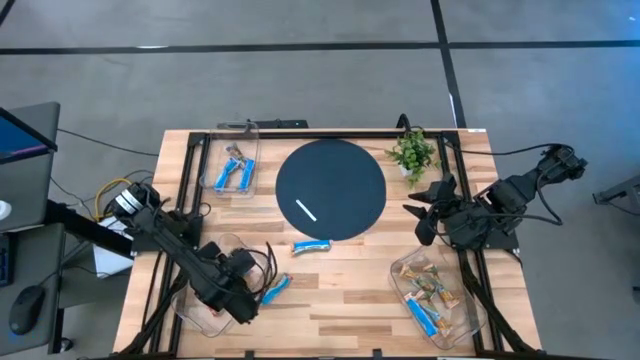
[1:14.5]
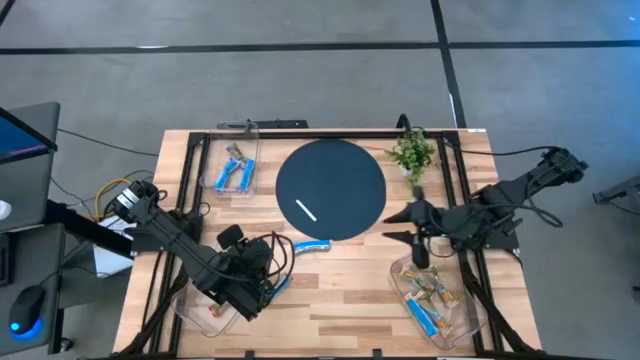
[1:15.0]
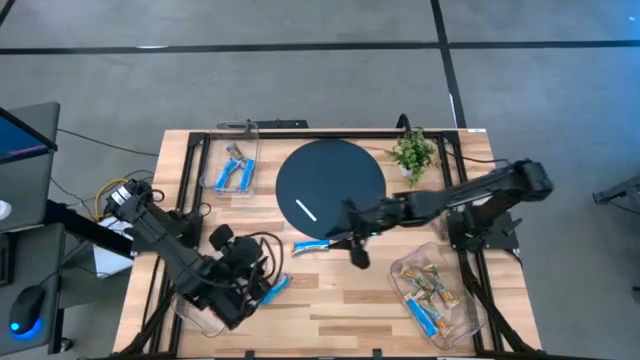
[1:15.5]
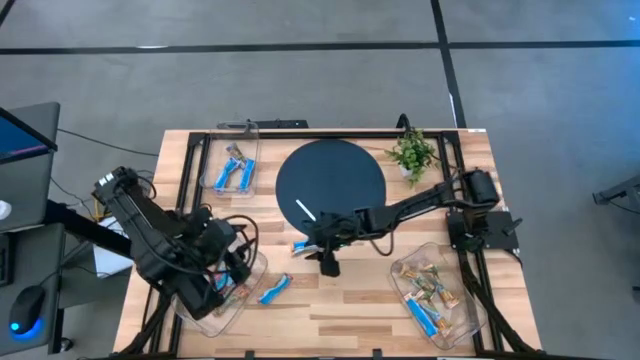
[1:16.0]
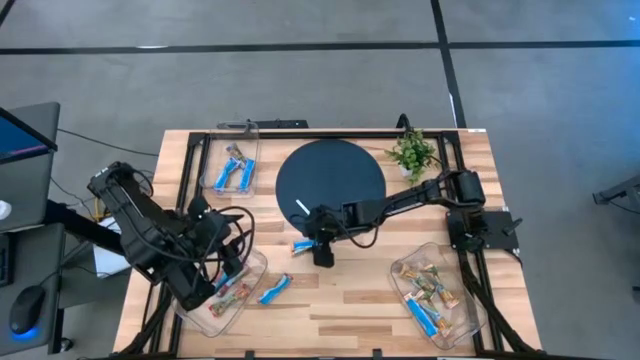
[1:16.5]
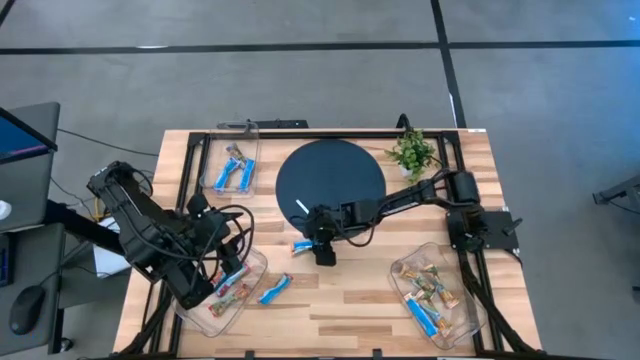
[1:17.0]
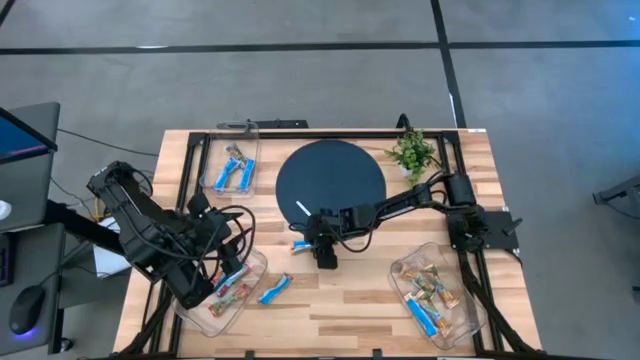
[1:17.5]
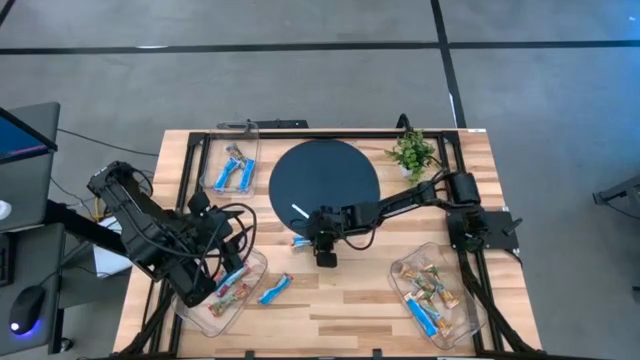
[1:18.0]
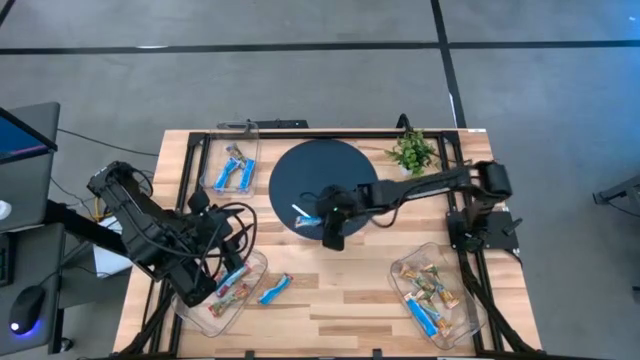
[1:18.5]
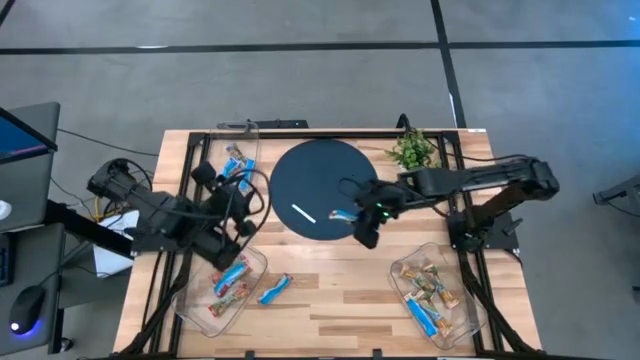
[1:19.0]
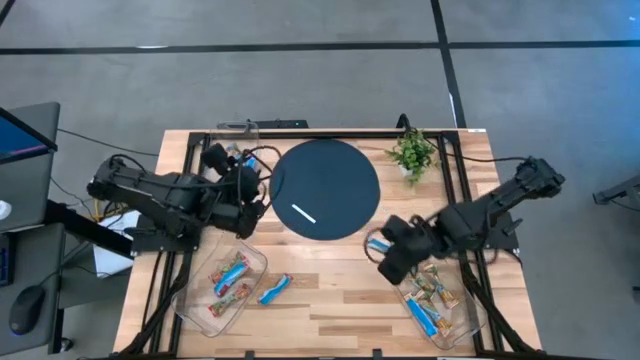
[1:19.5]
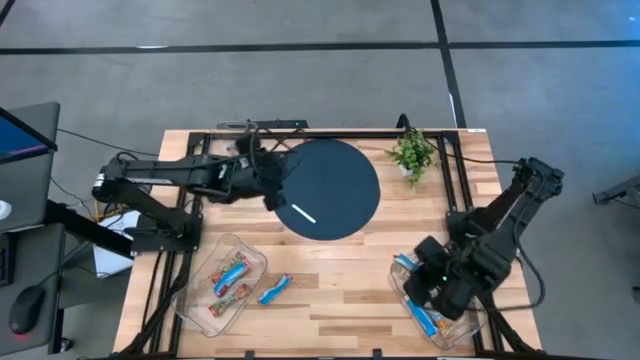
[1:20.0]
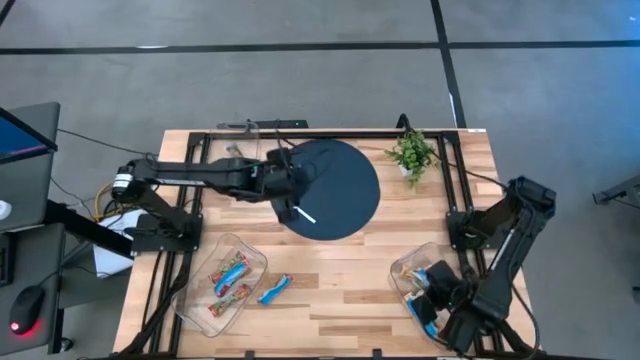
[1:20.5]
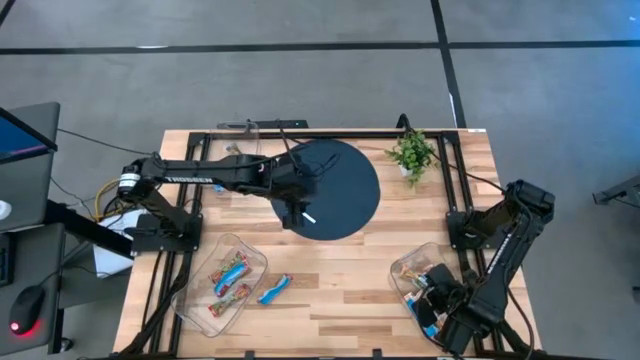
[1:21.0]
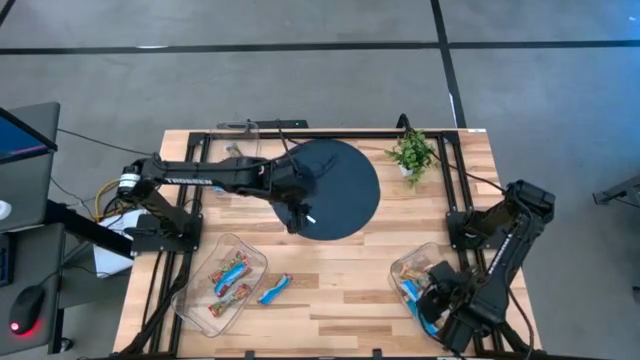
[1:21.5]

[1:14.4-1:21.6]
Task: Pick and place Granola Bars by type
Put the yellow granola bar into the bottom right transparent bin

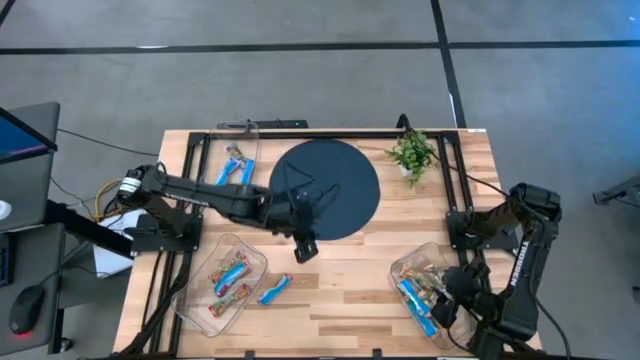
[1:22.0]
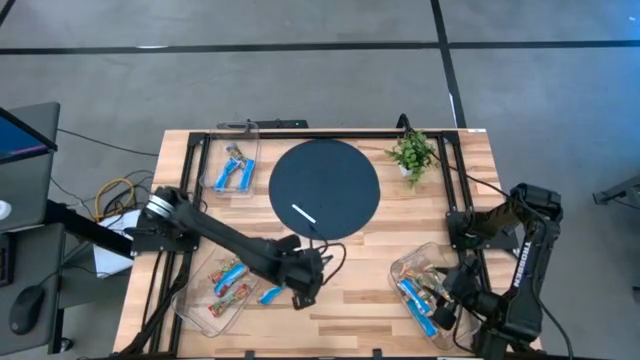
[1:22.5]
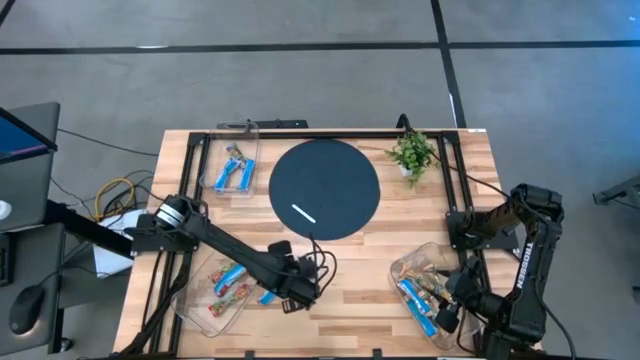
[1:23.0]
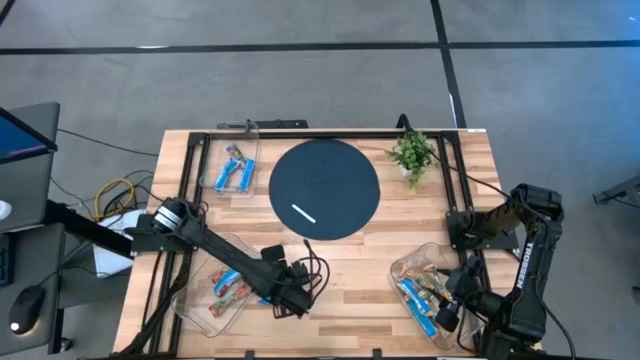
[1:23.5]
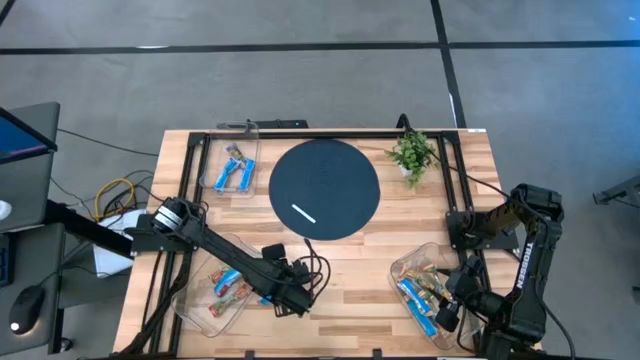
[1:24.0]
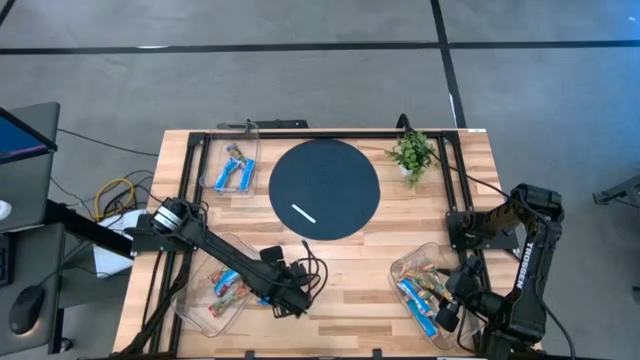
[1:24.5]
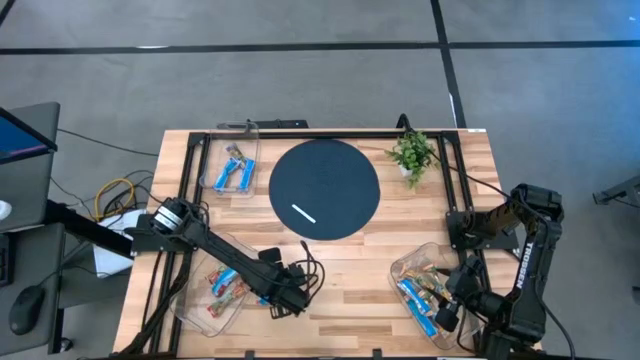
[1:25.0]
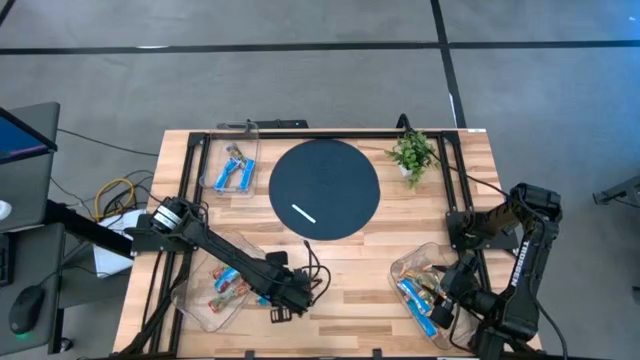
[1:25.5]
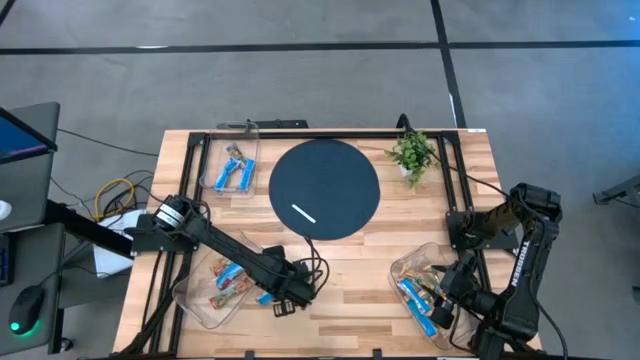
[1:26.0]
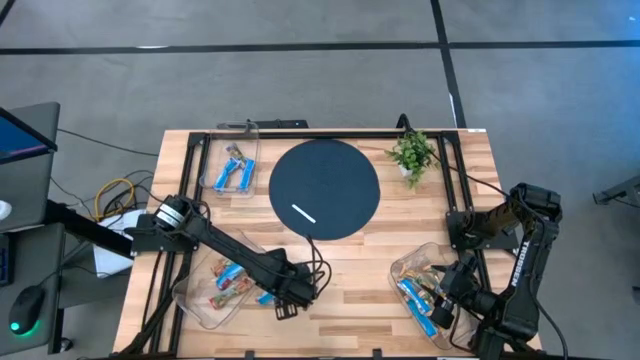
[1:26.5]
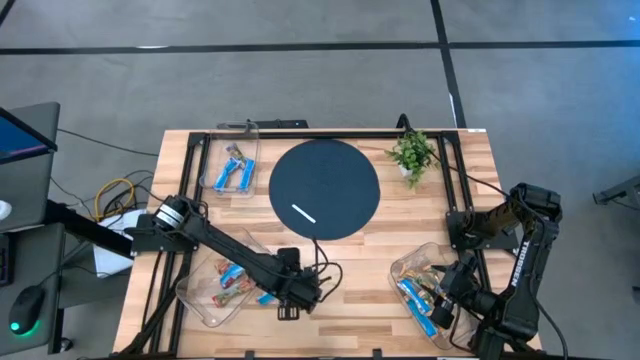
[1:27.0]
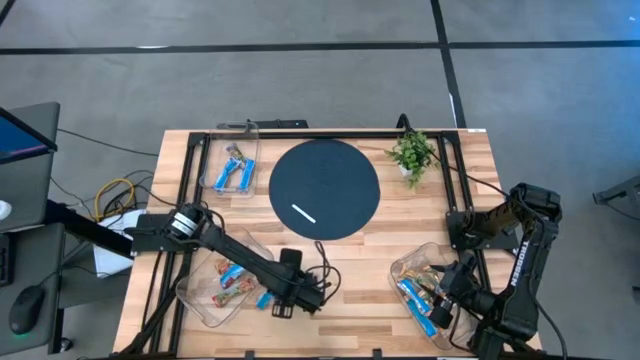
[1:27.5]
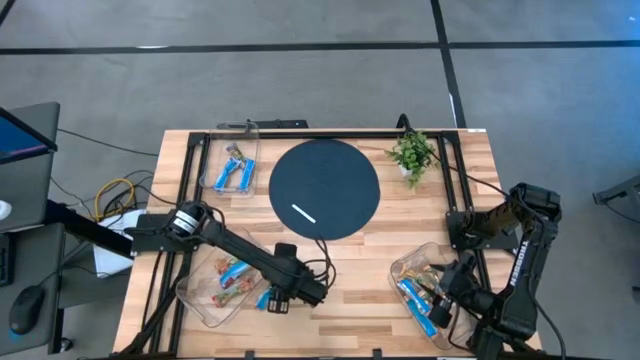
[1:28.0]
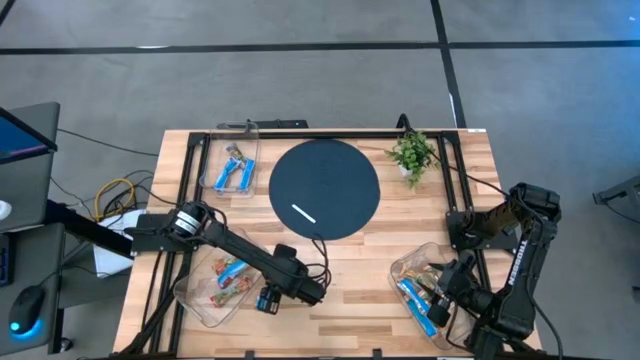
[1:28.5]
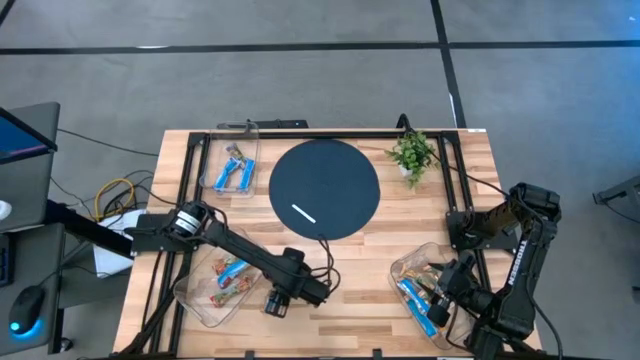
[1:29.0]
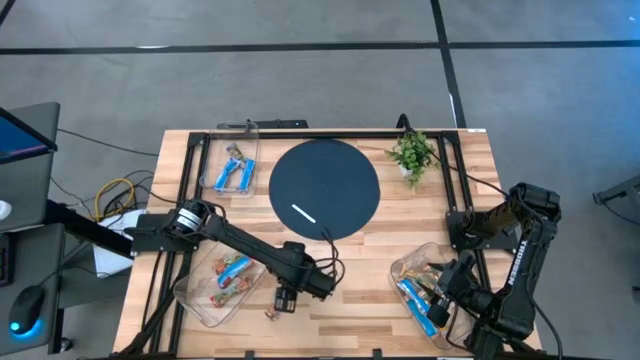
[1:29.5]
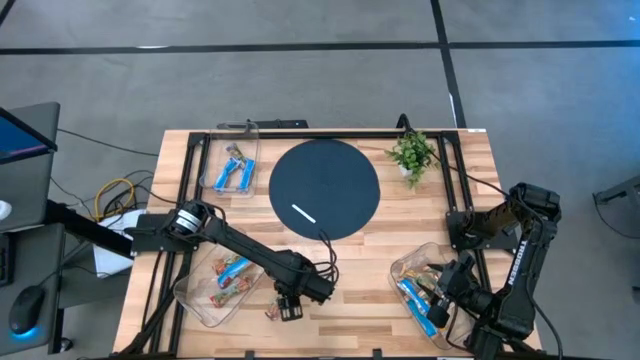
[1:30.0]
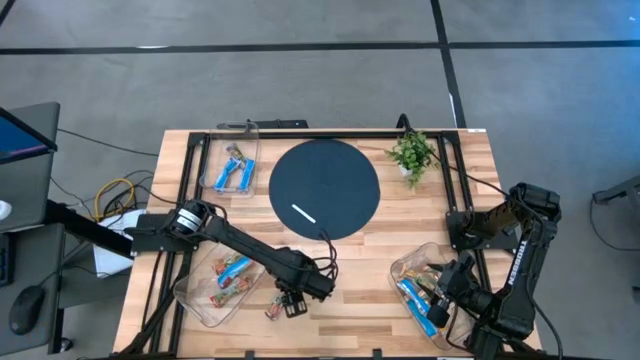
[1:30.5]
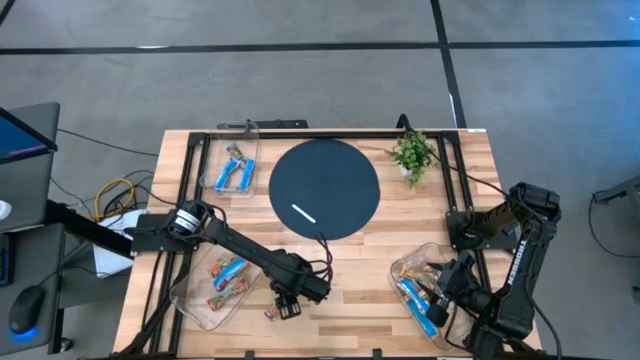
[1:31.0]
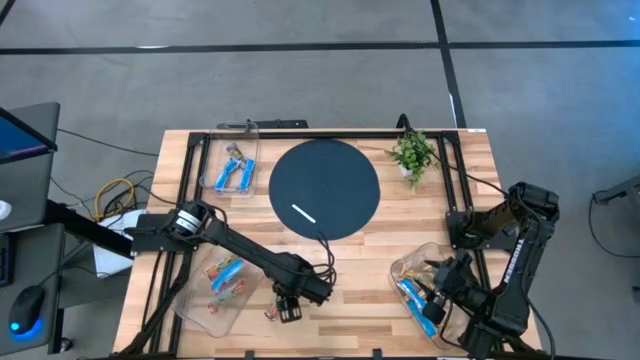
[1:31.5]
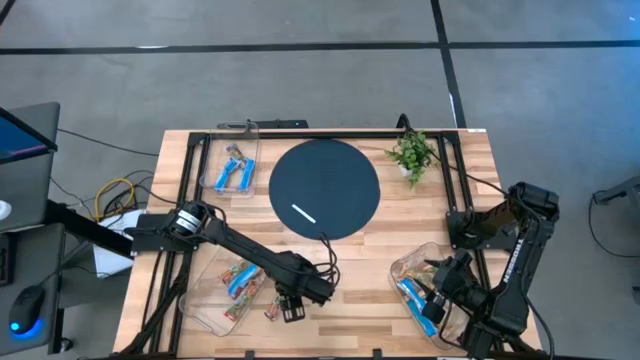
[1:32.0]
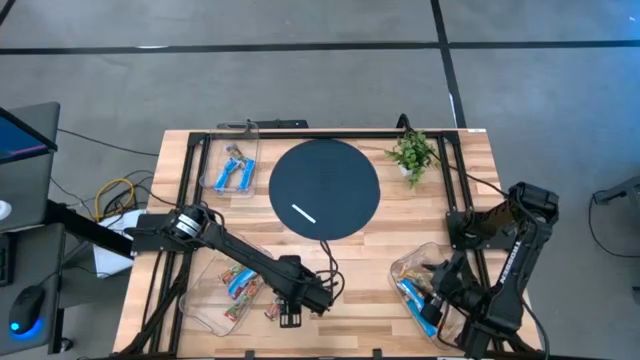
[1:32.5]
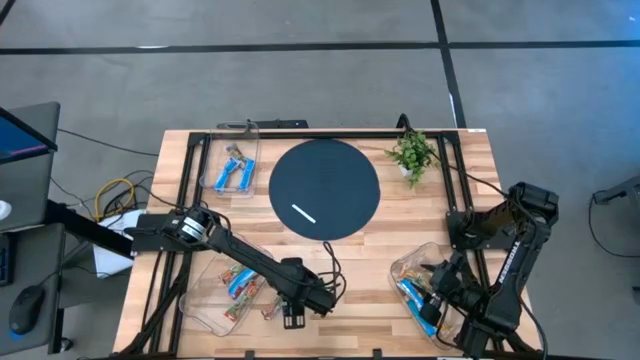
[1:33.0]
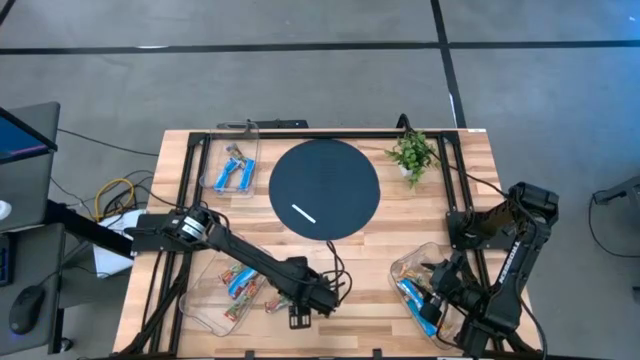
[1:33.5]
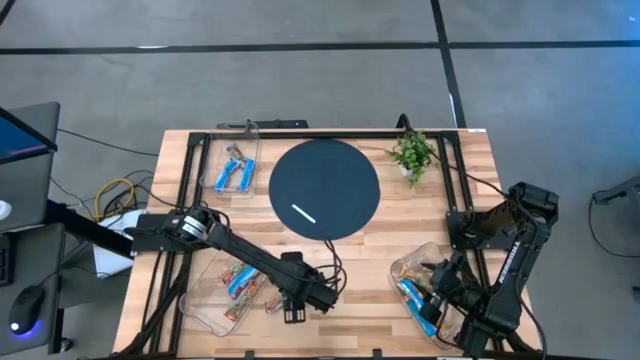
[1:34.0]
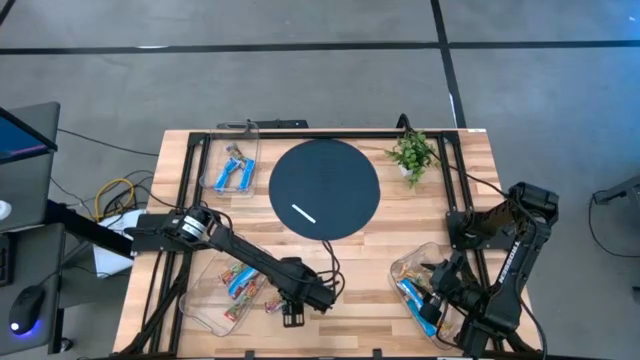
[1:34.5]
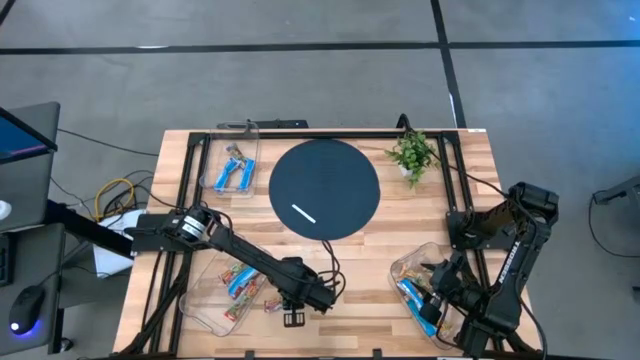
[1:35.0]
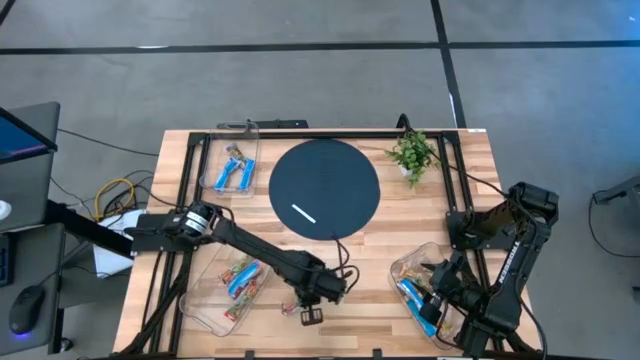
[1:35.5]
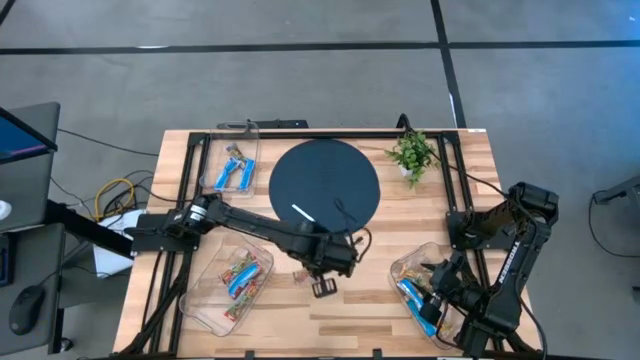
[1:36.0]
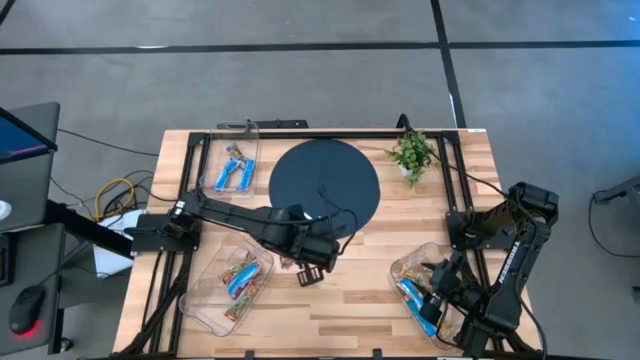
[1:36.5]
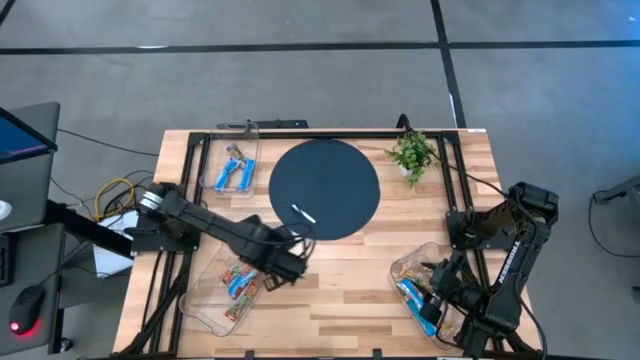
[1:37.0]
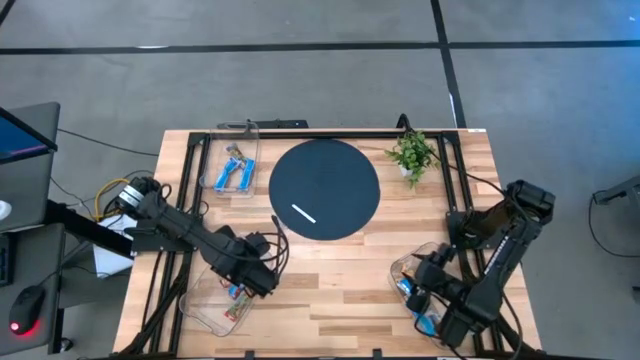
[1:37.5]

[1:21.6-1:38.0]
Put the red granola bar into the bottom left transparent bin
